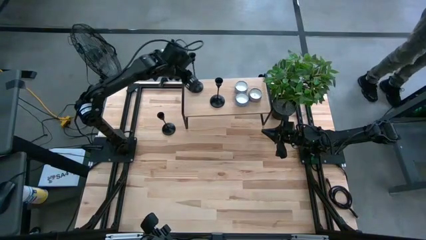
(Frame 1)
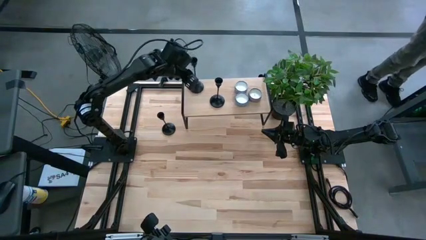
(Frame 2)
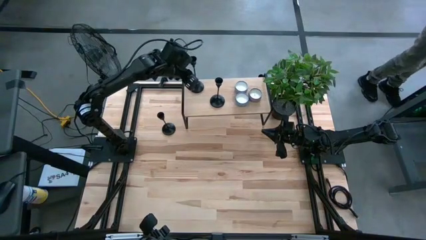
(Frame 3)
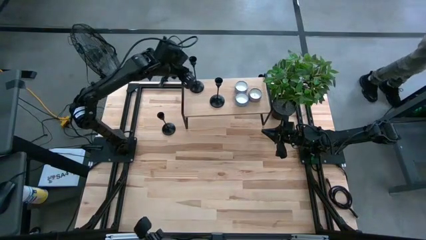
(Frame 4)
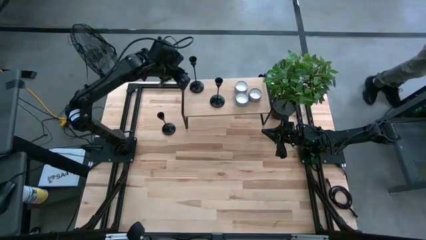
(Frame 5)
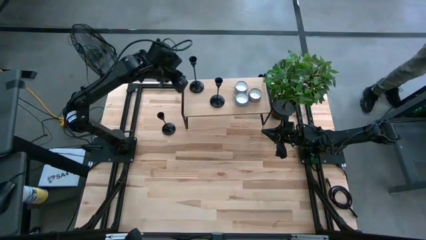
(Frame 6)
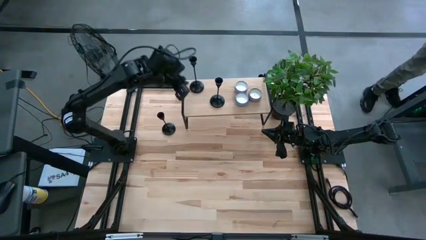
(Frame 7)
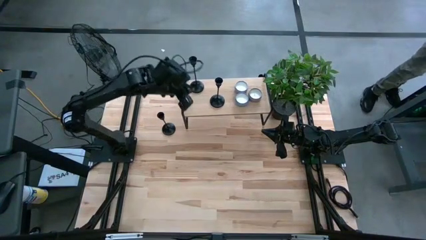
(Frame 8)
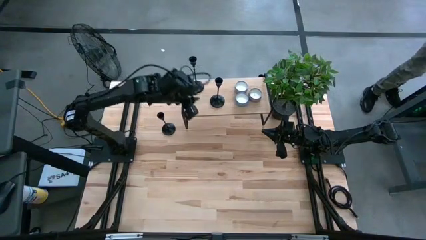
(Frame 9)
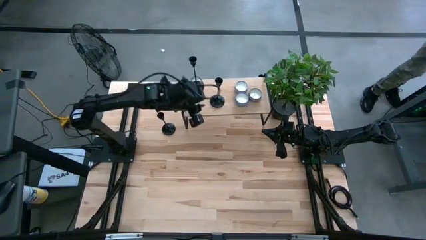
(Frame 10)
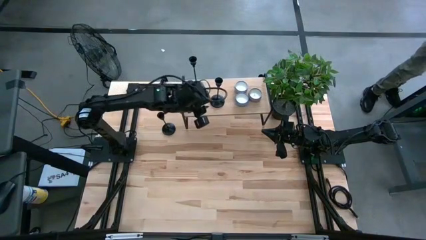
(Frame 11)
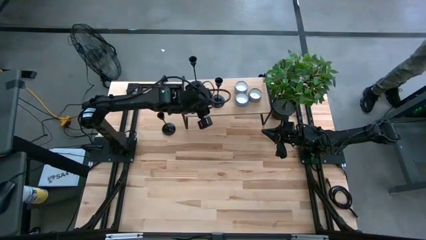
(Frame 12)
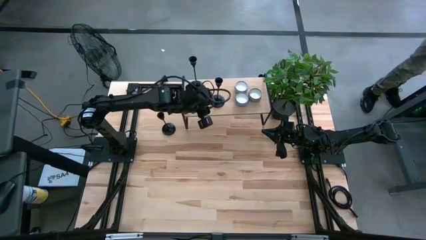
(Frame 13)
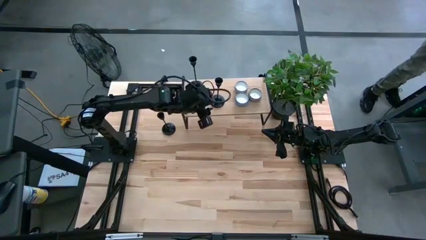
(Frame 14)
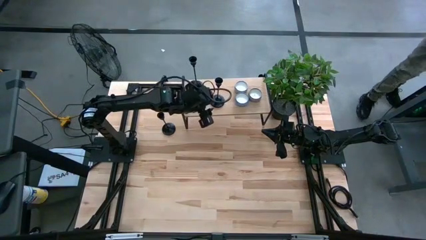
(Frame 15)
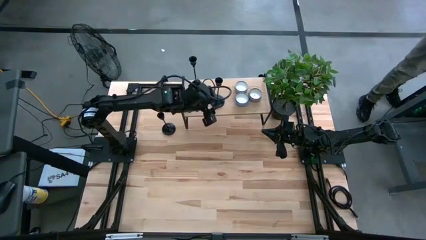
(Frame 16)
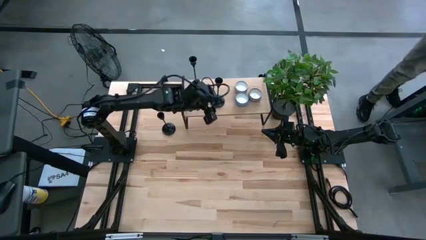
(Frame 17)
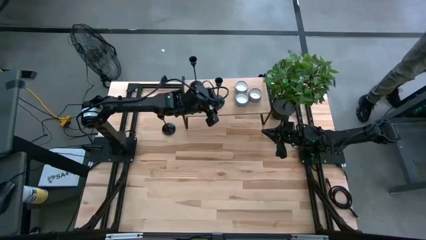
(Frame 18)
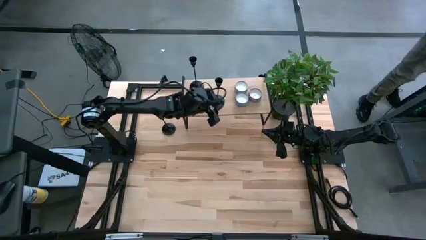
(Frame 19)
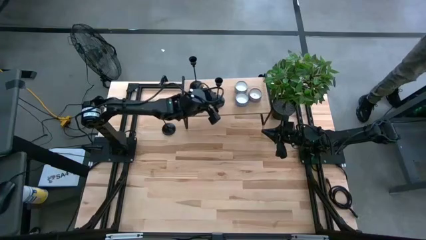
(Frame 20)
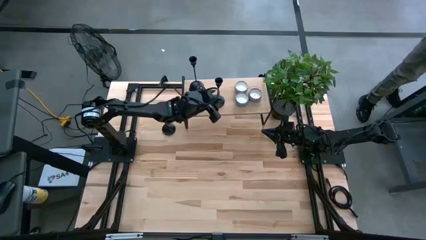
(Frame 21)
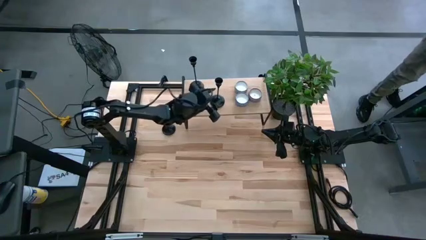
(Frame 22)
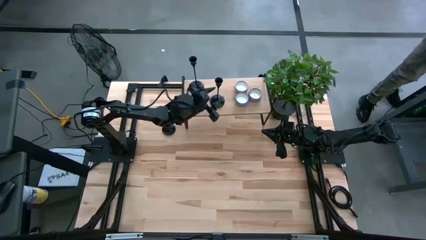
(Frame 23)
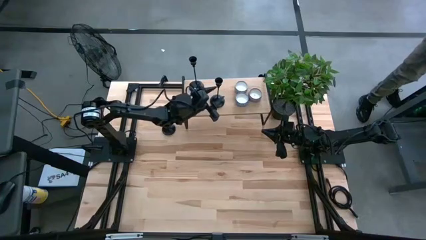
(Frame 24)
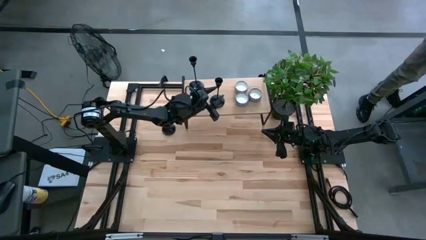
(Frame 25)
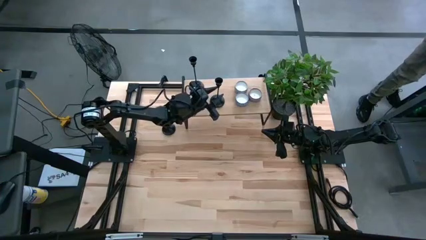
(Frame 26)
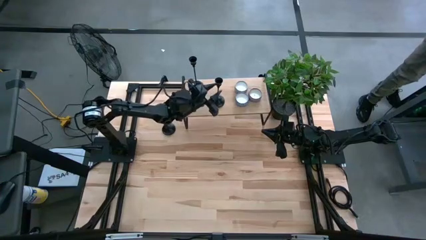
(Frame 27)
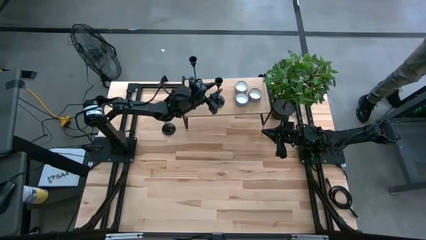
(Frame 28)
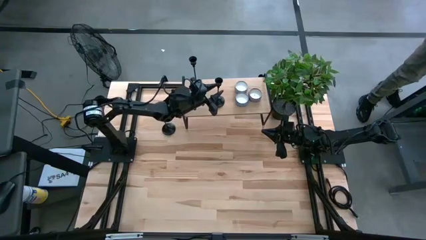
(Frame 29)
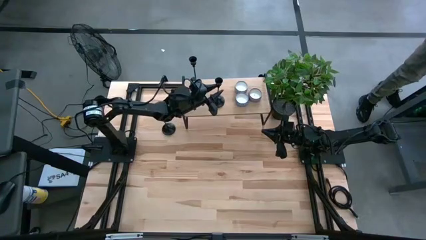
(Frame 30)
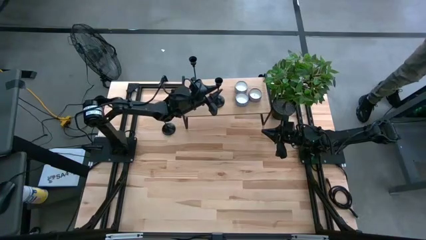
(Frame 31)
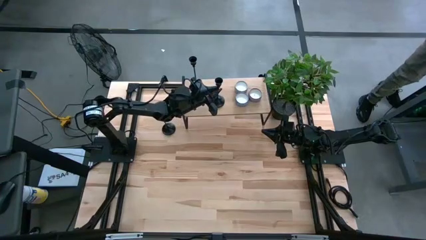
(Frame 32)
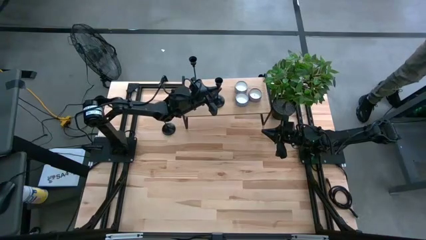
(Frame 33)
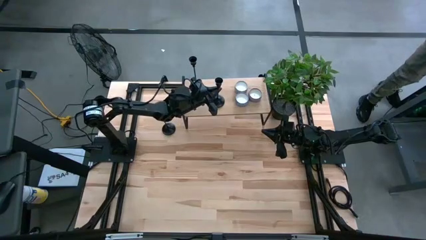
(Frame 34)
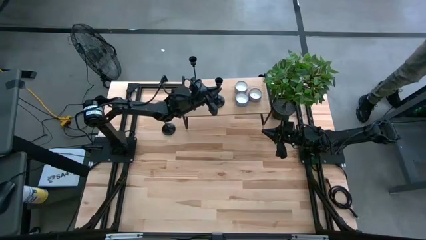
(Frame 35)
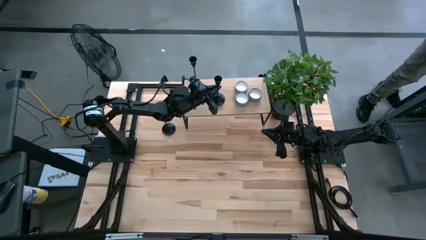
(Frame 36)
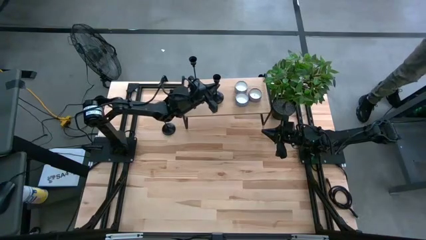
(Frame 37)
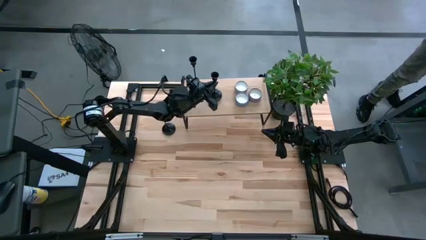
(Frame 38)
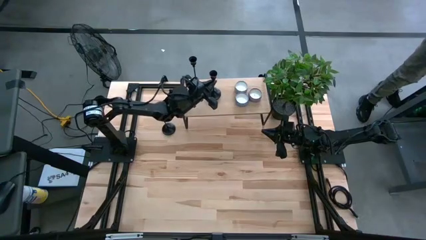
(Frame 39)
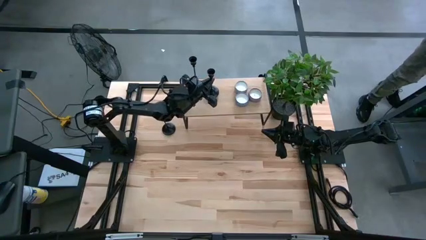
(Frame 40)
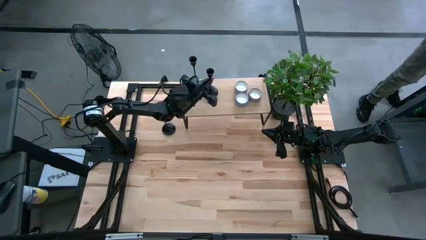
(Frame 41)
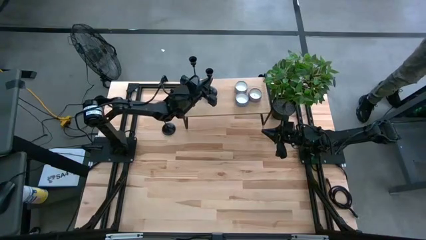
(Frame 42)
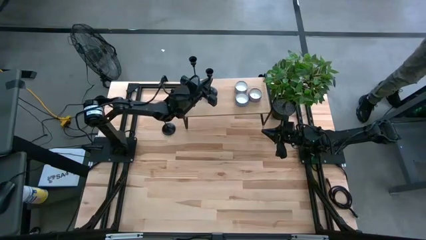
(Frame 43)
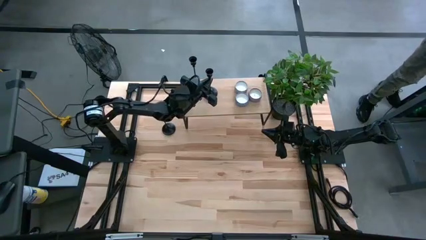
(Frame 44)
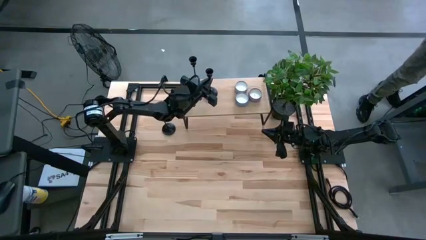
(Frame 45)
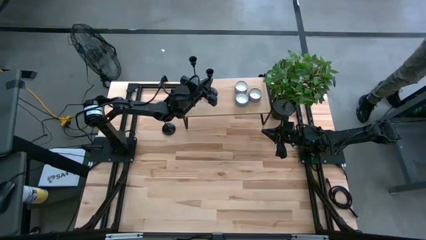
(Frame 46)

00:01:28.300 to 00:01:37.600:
Task: Pick & Place candle stick holders
Adjust the black candle holder on the shelf

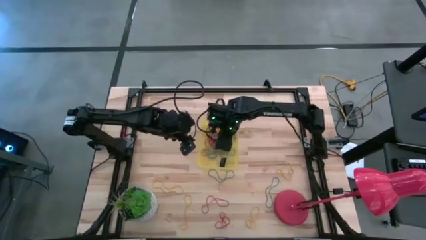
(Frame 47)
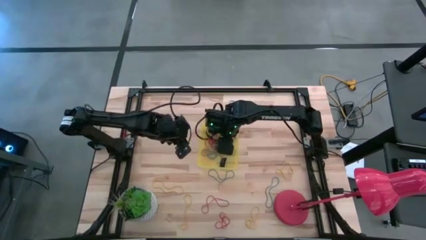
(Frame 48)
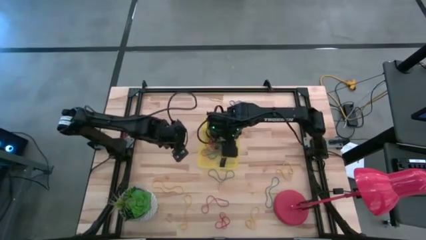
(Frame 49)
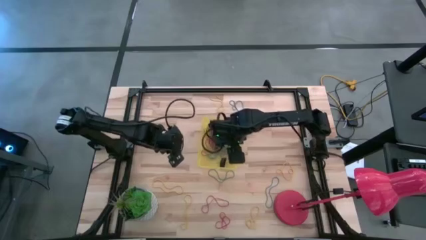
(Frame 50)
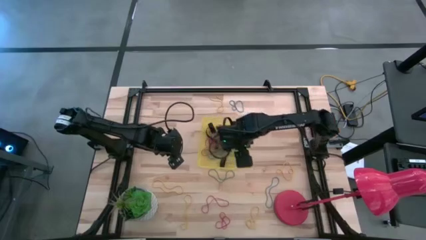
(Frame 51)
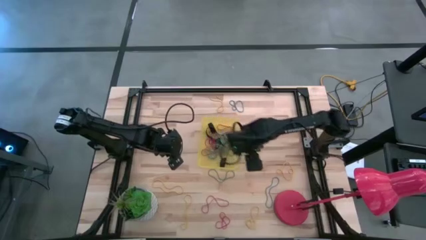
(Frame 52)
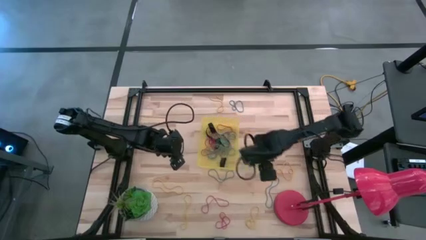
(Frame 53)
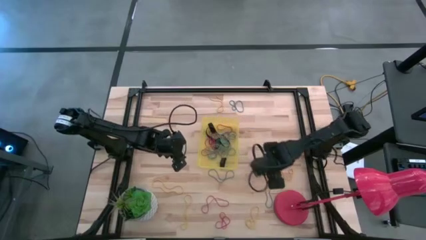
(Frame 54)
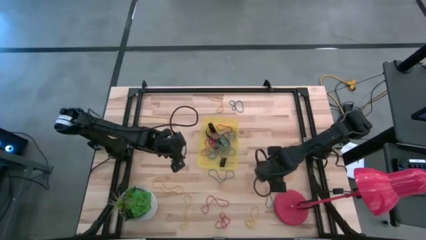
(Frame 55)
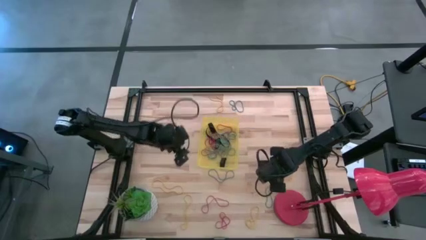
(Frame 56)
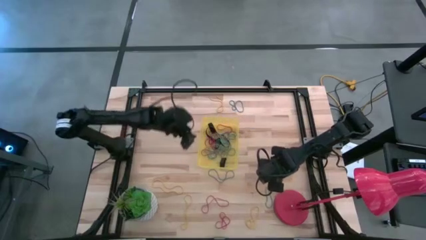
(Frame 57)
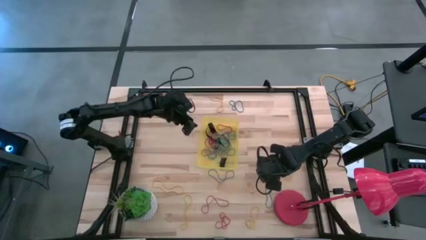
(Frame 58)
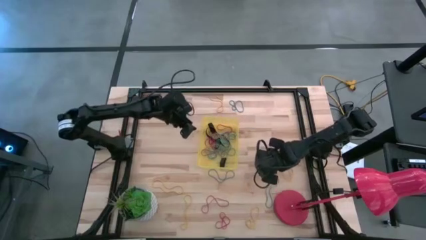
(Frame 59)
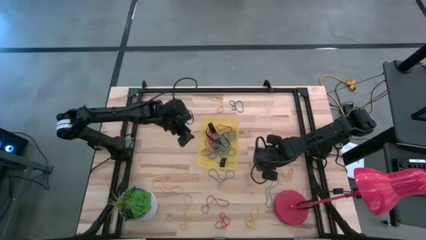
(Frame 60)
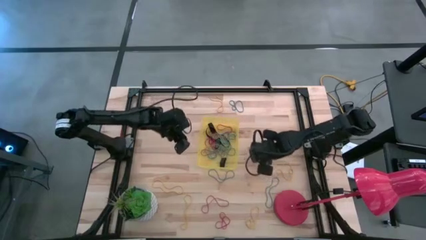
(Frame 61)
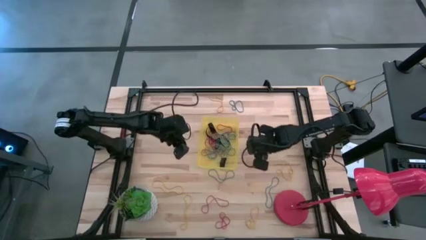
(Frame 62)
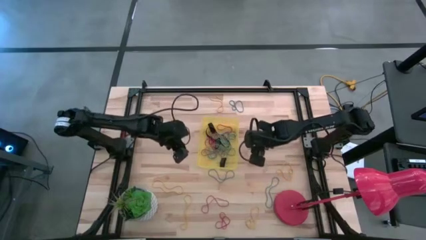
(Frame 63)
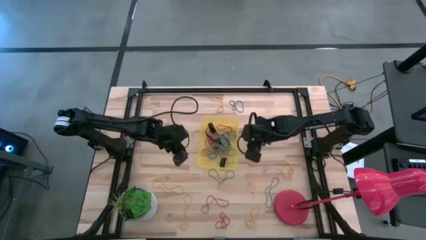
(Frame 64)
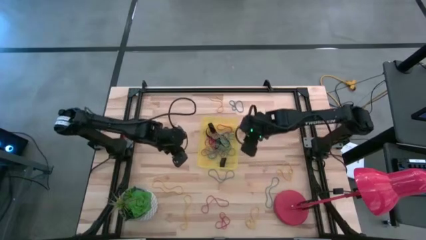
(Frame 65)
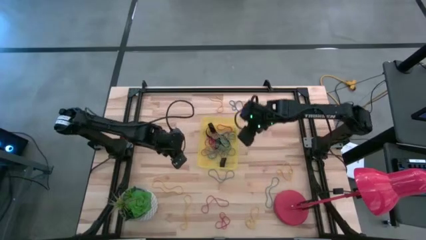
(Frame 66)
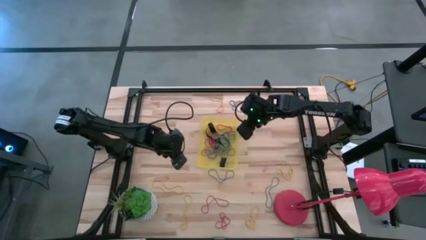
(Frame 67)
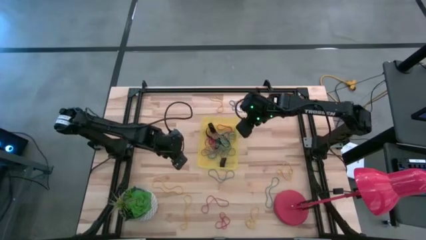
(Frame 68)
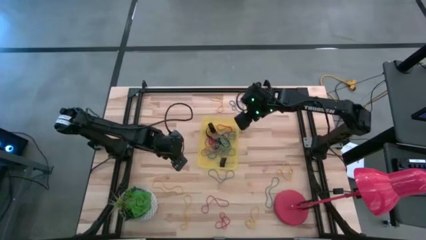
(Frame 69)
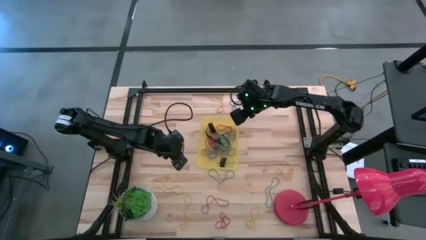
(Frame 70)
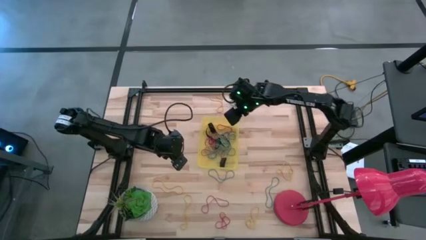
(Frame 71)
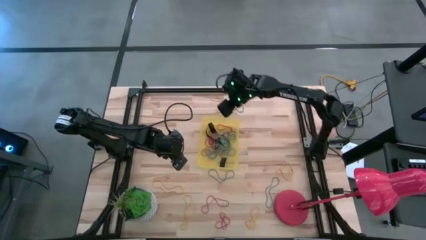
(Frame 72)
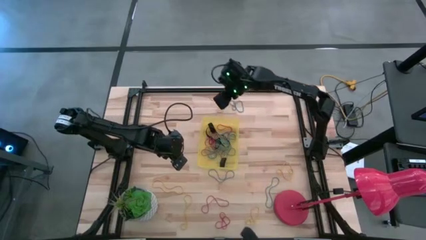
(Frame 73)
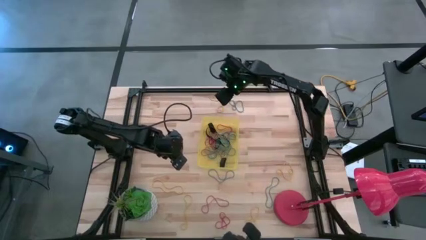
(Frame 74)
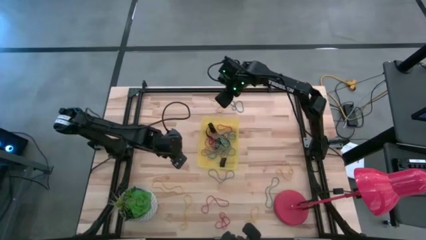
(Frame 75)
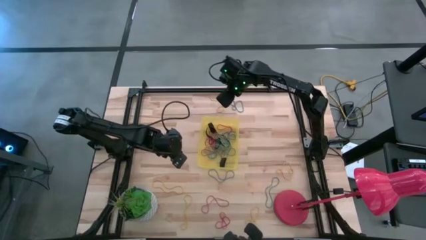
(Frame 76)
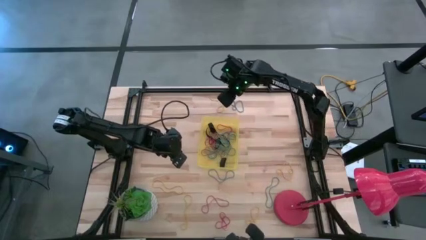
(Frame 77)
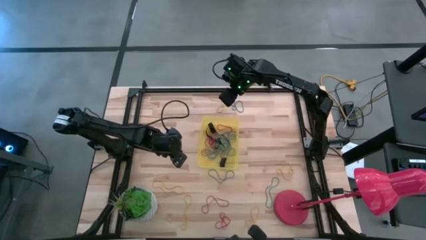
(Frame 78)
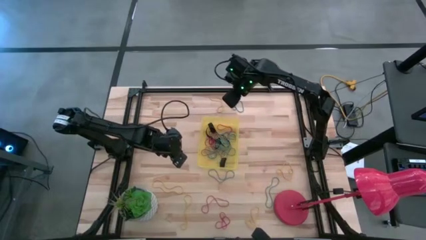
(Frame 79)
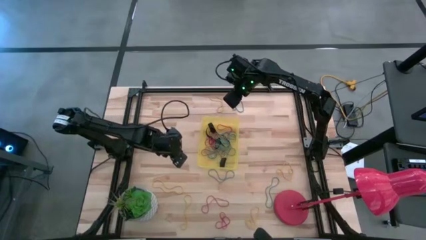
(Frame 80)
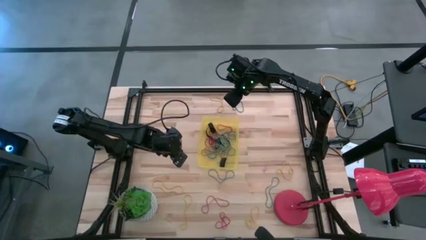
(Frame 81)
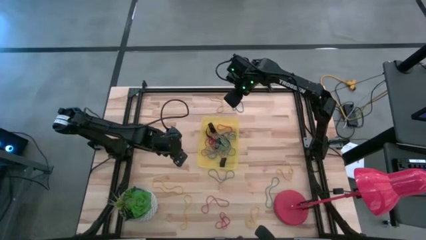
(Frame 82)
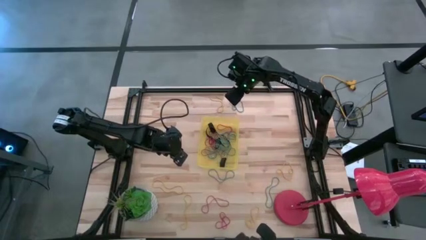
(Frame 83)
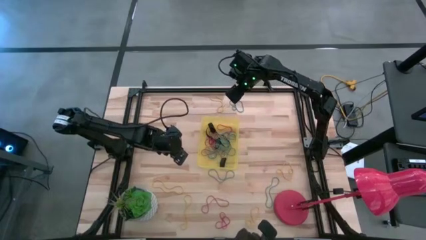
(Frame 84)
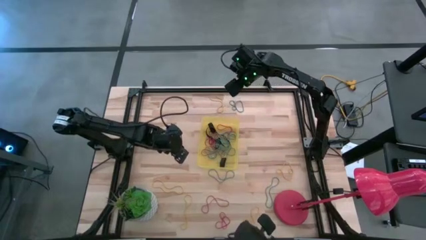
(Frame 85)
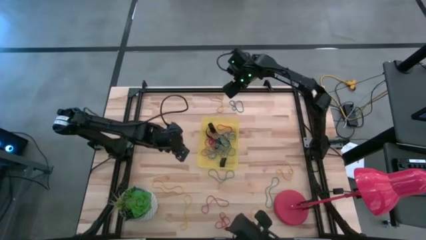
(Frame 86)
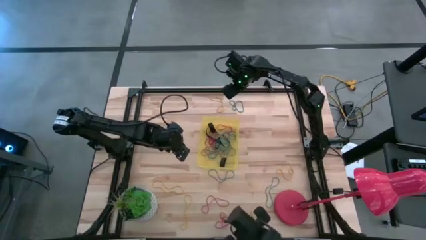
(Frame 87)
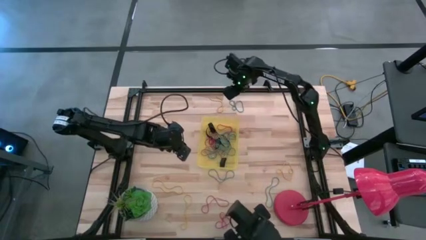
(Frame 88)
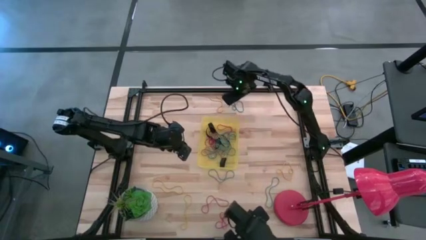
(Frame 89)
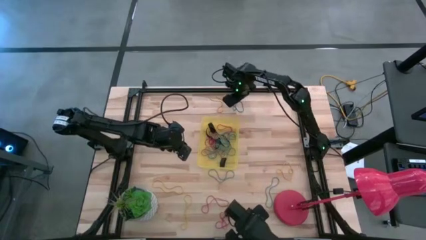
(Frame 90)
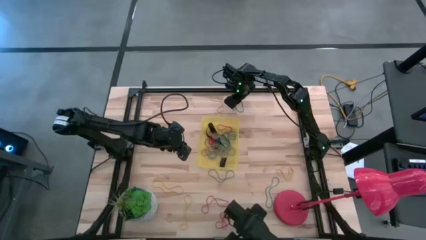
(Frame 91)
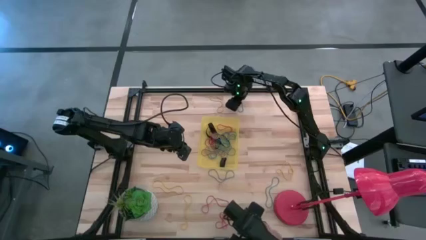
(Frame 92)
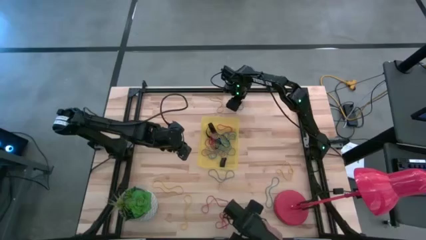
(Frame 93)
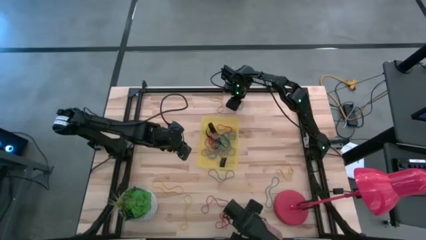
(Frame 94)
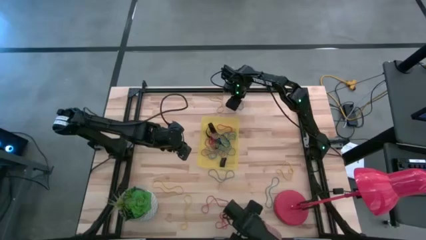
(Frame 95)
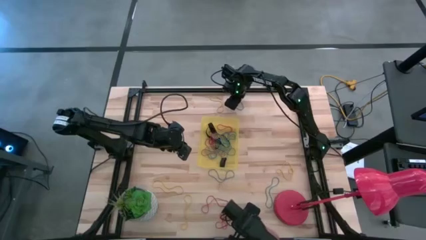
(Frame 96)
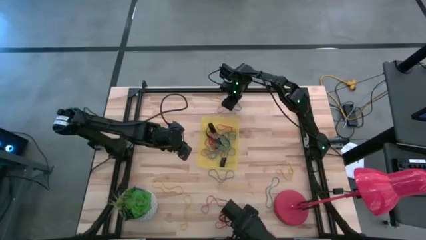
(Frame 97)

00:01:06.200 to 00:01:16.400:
Task: Pick and place rubber bands into bin
Put the blue rubber band into the yellow bin
